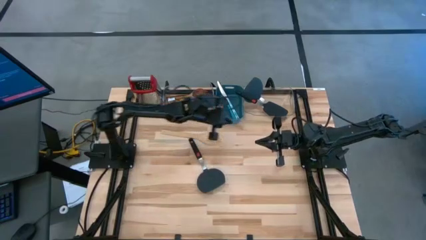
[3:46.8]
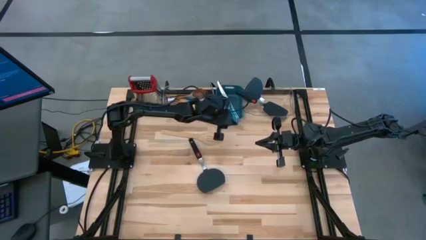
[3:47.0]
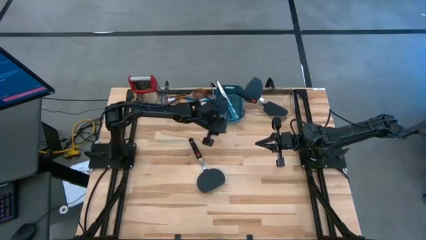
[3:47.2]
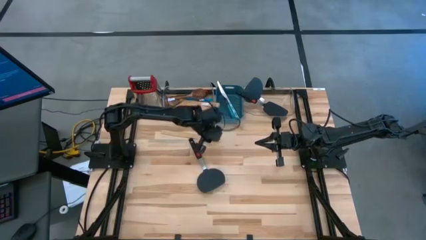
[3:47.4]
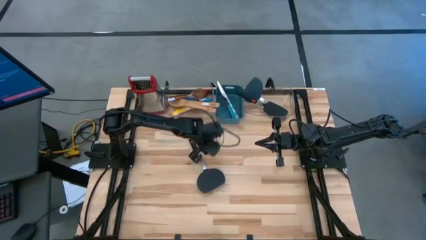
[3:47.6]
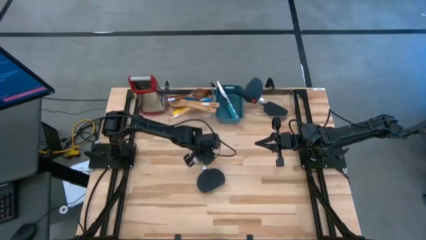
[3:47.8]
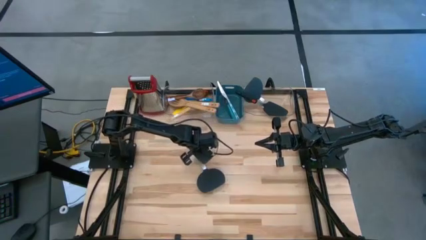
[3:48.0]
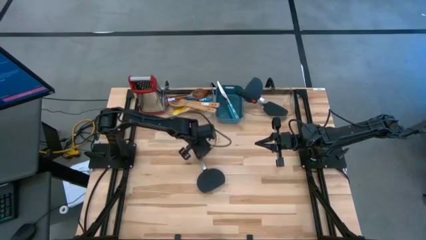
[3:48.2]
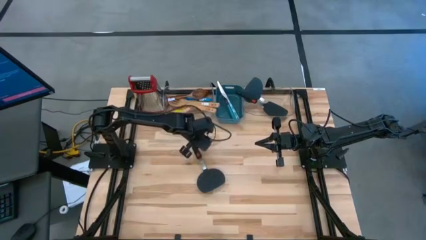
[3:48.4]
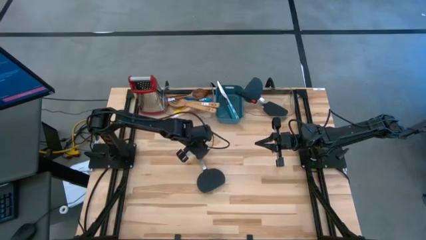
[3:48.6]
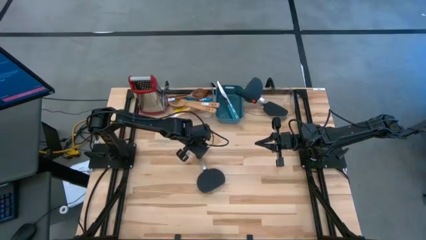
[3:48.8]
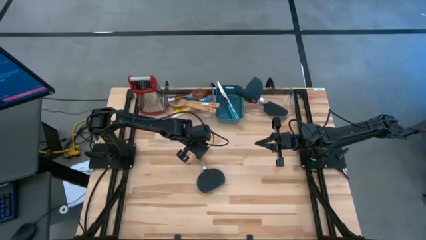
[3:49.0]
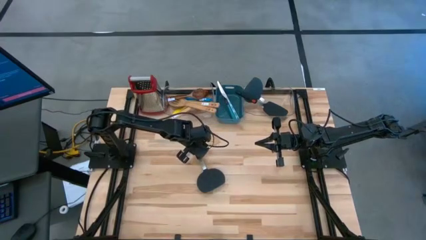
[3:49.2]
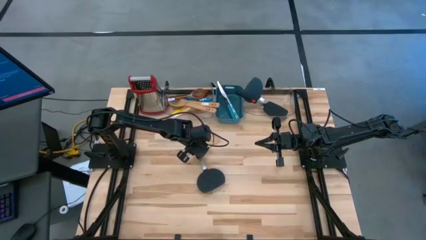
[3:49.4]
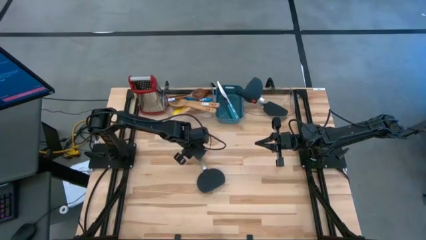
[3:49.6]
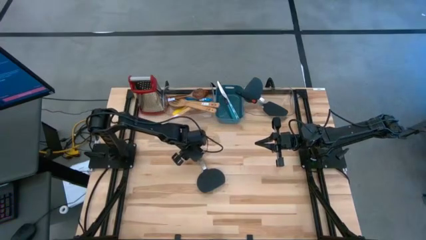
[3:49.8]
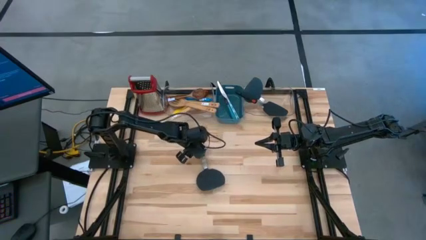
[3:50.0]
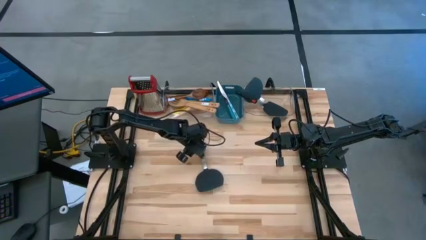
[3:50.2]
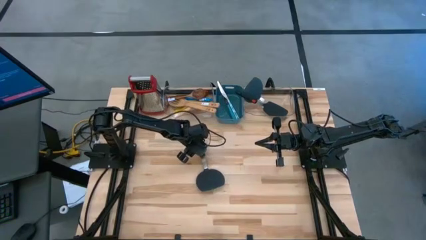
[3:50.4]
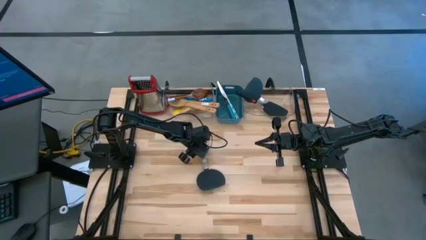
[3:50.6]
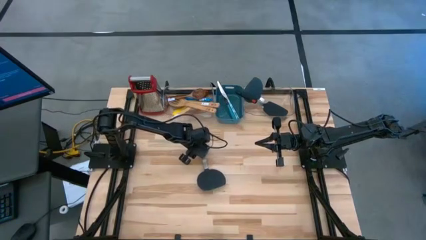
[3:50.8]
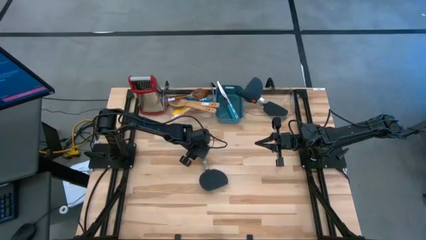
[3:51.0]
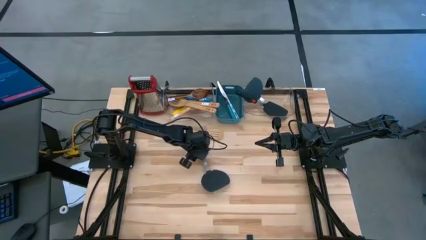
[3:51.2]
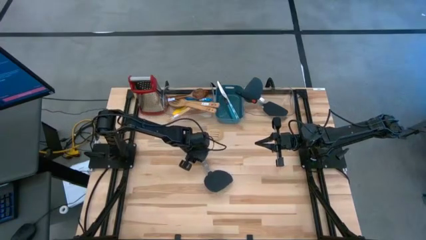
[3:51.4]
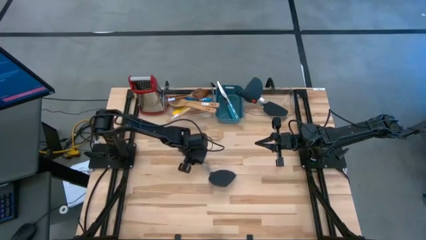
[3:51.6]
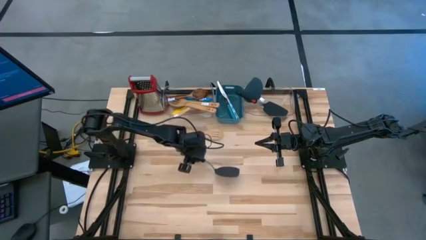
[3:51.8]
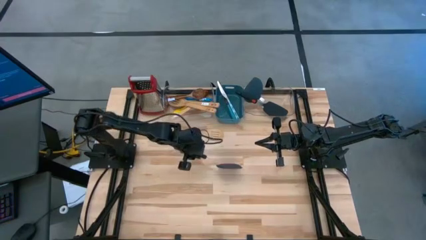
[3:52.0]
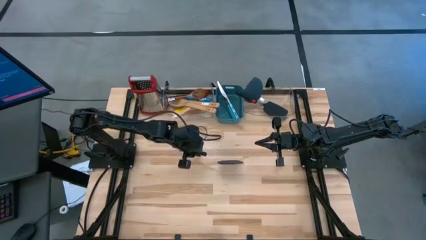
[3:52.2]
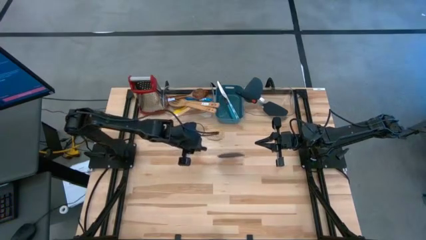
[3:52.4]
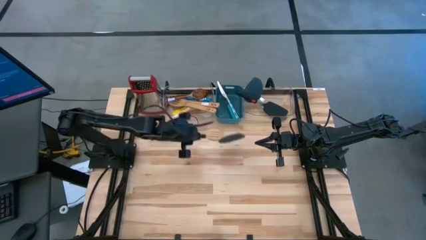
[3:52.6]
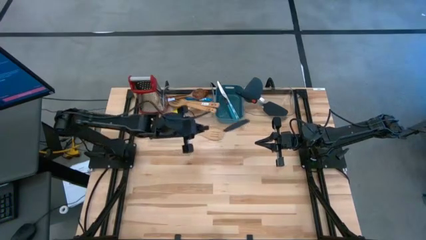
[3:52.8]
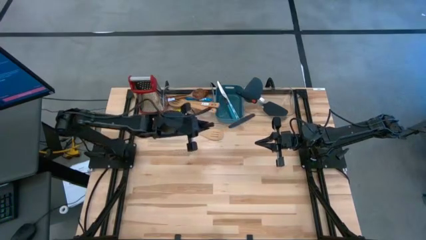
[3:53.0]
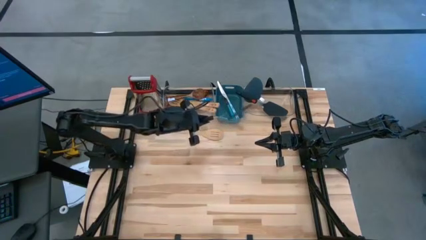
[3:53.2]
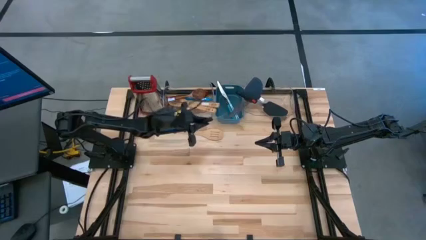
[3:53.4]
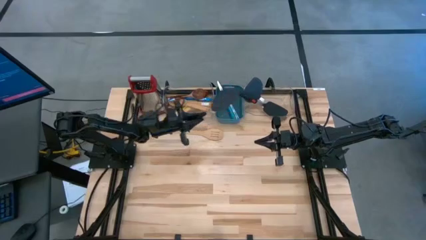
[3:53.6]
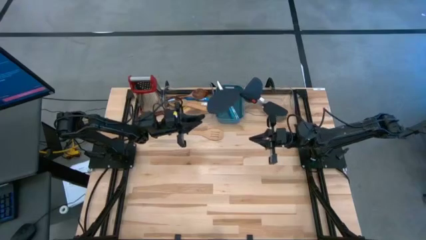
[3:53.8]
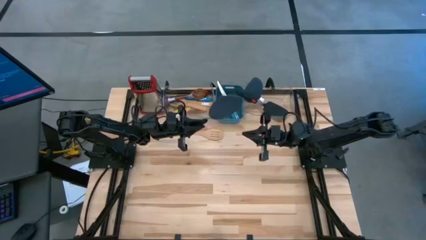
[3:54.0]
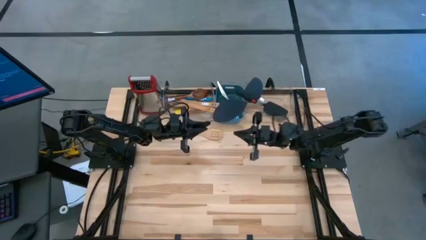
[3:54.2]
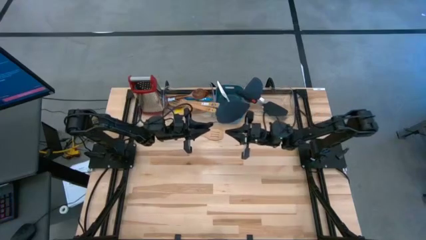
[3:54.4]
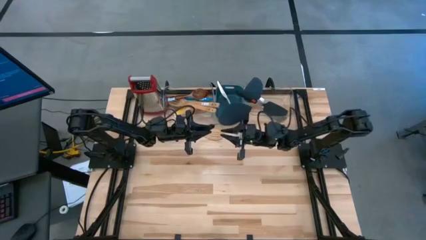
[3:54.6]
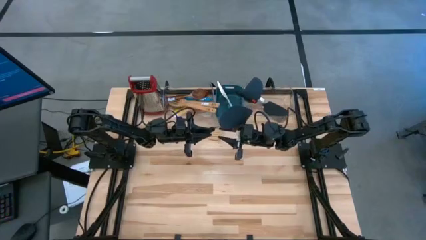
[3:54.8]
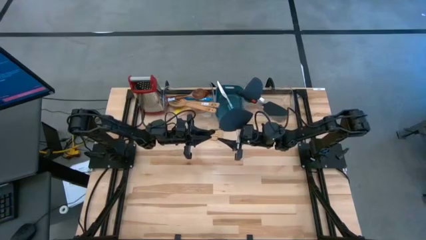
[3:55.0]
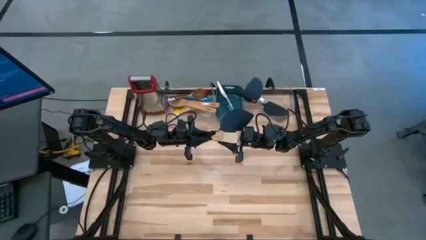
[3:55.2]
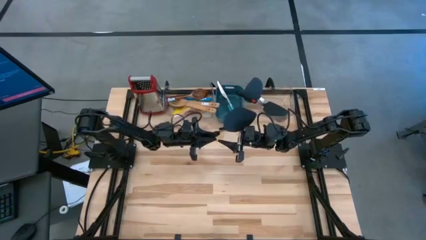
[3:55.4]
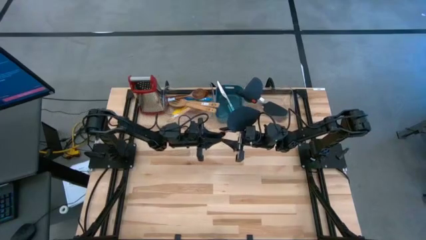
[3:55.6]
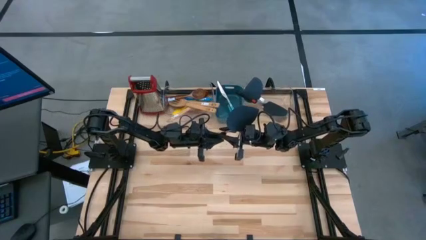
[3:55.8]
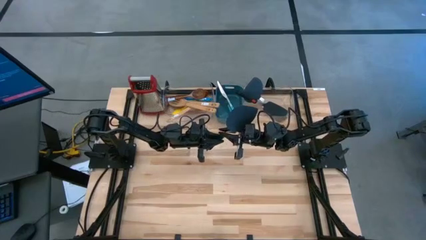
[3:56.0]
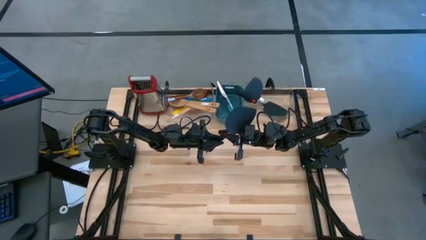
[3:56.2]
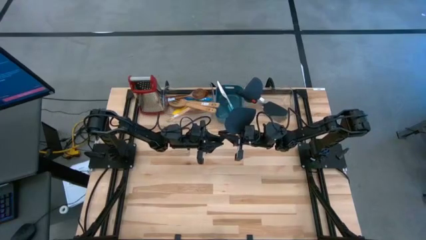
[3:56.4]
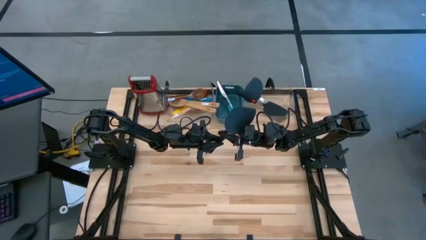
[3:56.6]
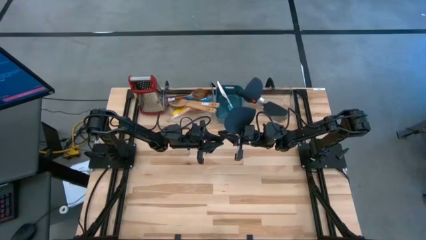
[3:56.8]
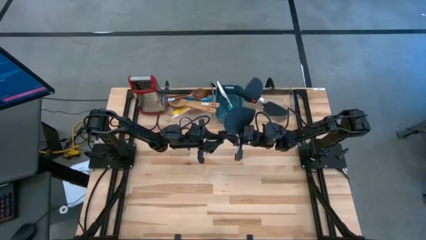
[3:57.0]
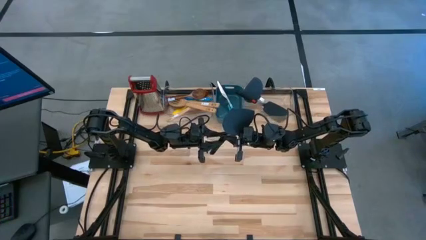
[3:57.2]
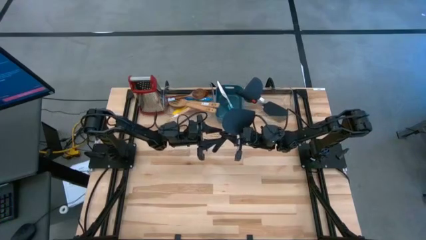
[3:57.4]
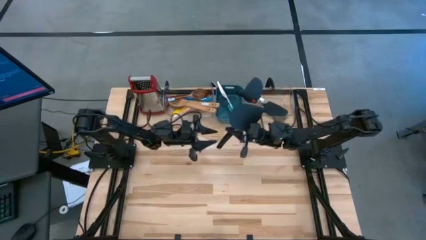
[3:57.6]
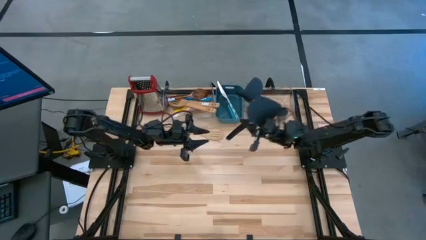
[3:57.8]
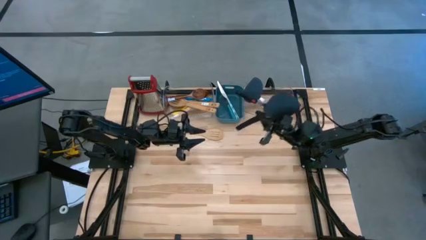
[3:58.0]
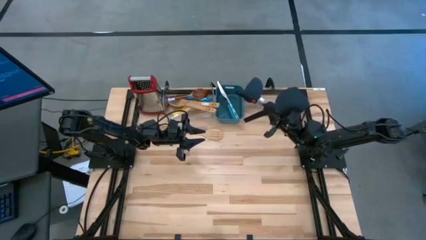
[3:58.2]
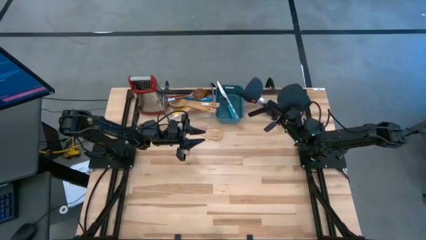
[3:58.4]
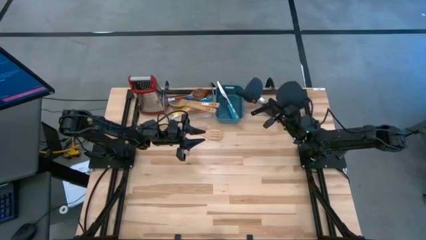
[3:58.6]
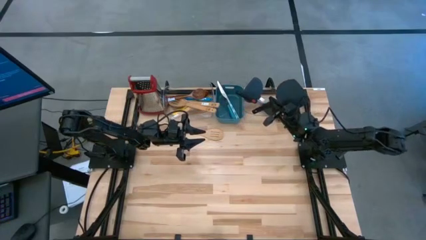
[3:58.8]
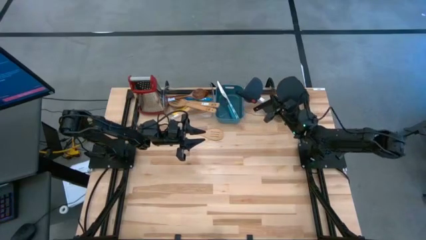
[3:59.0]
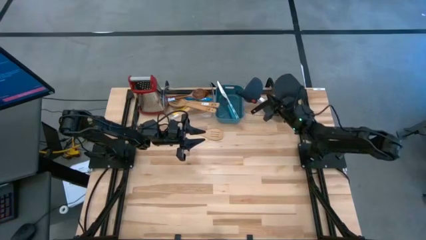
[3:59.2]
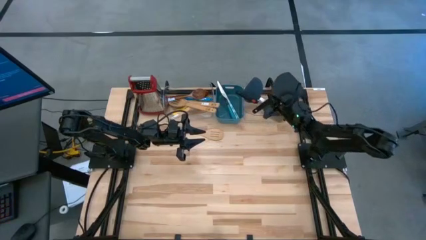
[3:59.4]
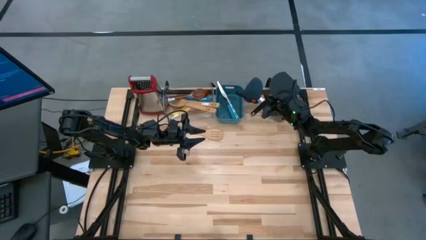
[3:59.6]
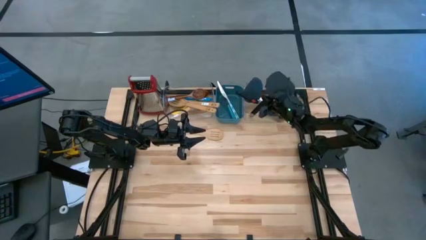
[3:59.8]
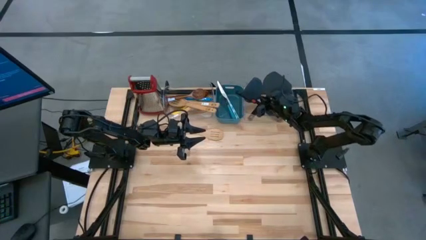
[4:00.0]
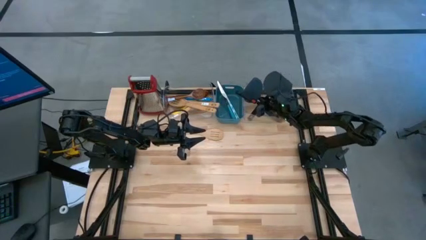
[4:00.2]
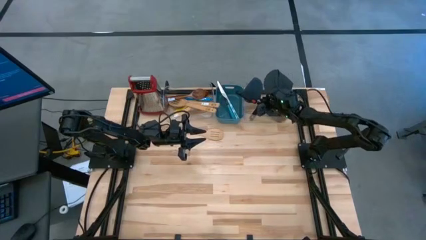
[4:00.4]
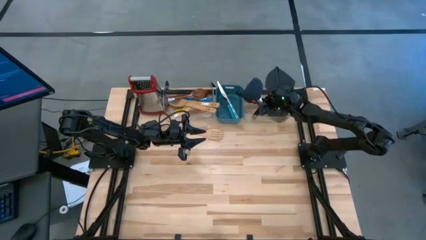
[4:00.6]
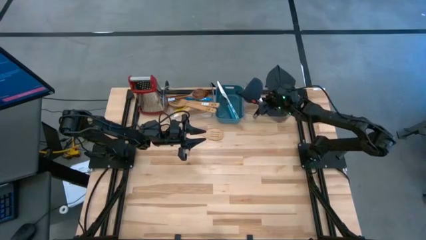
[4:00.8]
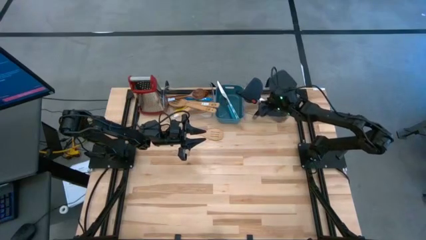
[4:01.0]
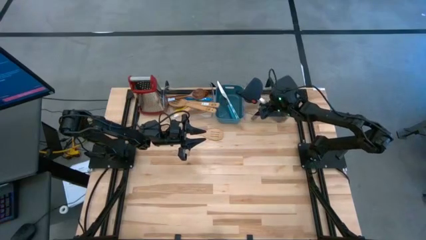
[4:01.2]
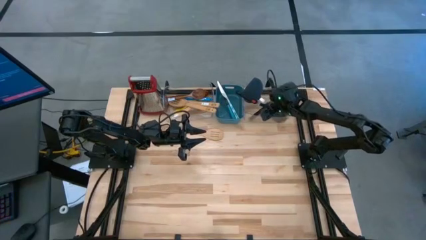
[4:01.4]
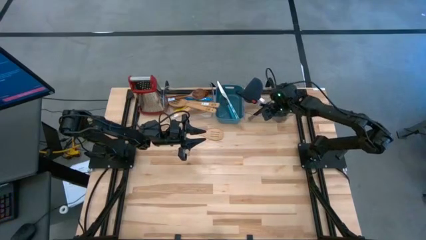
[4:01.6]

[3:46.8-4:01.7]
Task: Pick & Place Kitchen Items
Put the black spatula into the right transparent bin

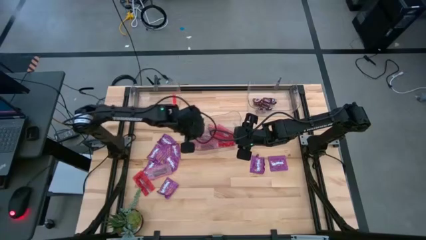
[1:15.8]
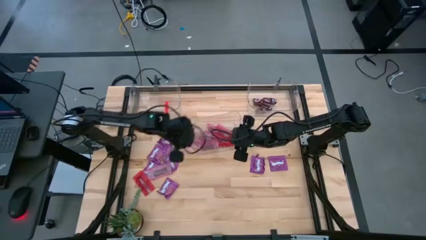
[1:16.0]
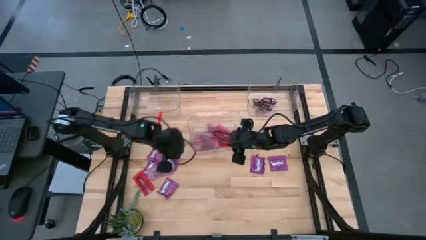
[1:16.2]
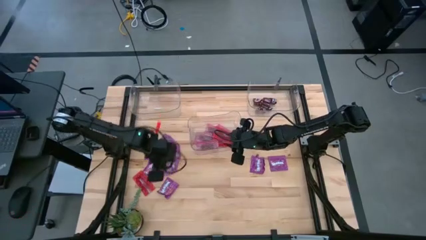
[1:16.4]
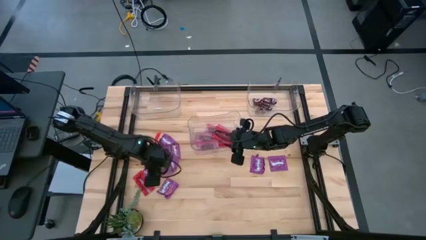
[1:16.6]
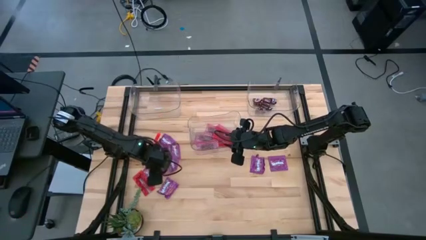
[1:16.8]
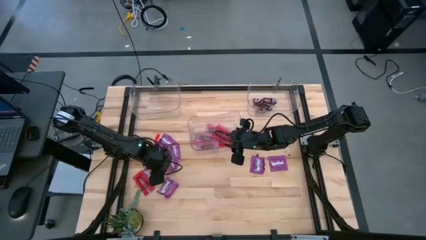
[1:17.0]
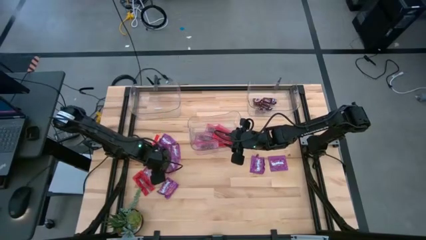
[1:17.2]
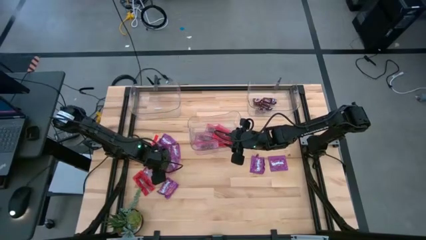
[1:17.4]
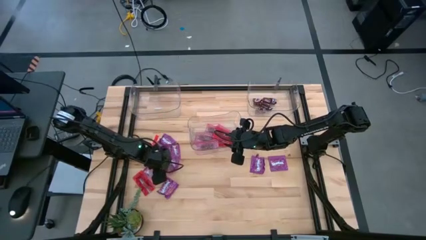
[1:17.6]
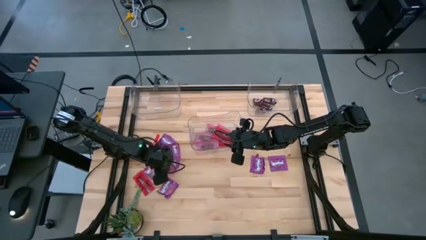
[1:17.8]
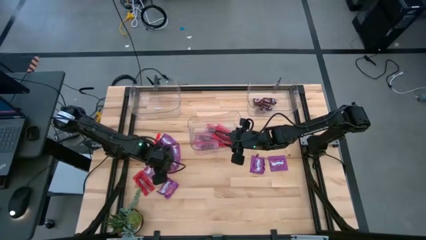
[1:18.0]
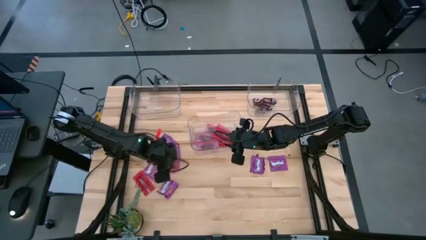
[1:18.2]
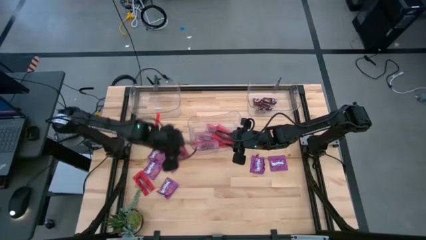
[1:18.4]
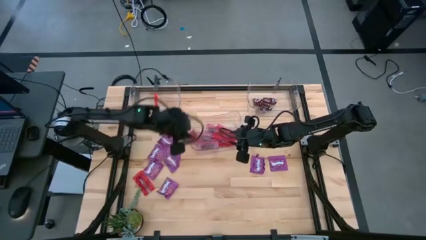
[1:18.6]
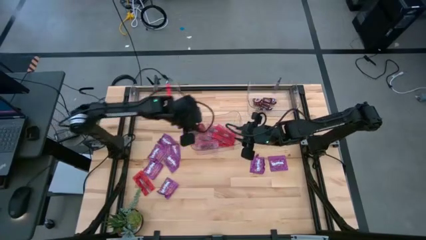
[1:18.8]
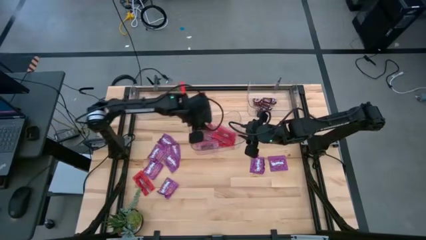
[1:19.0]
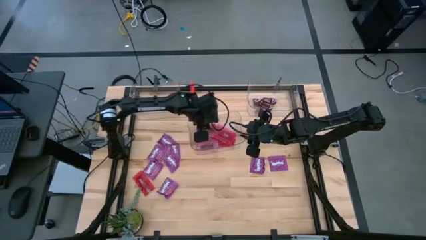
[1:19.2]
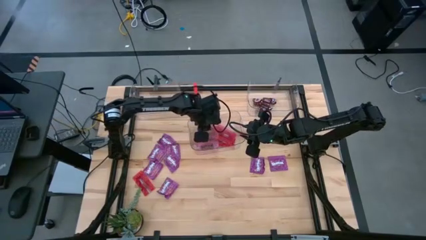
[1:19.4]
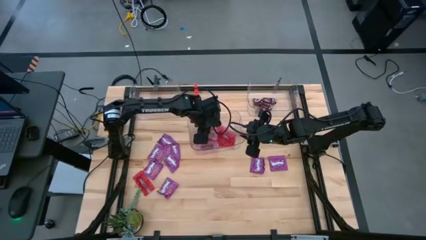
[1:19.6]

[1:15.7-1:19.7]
Task: Sort candy
Put the red candy pack into the bottom transparent bin
